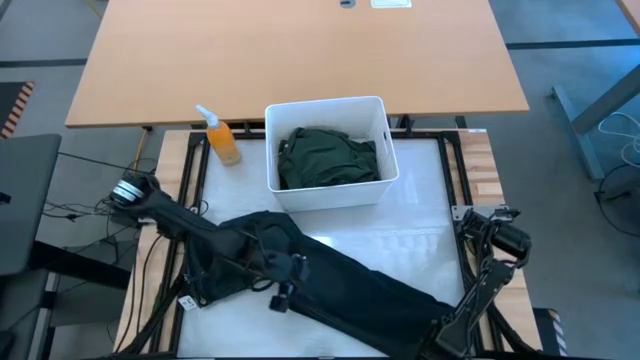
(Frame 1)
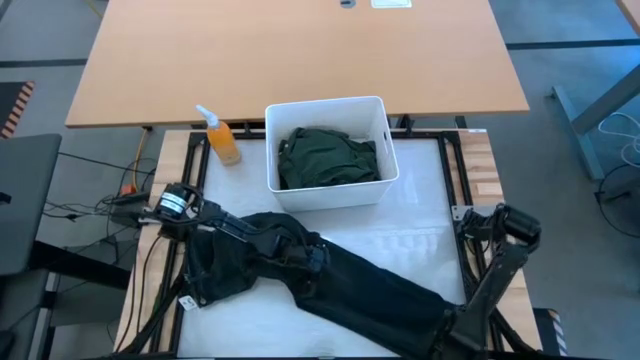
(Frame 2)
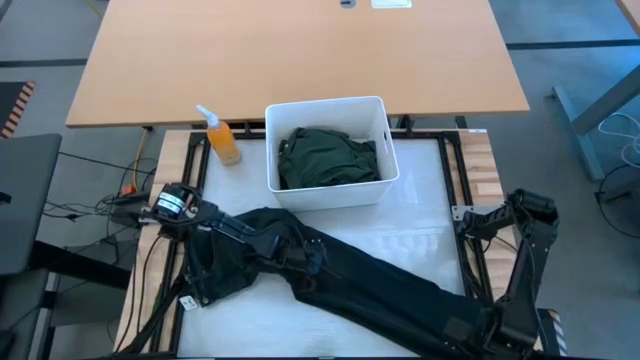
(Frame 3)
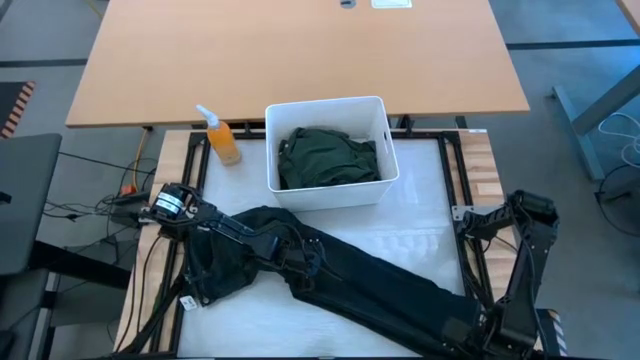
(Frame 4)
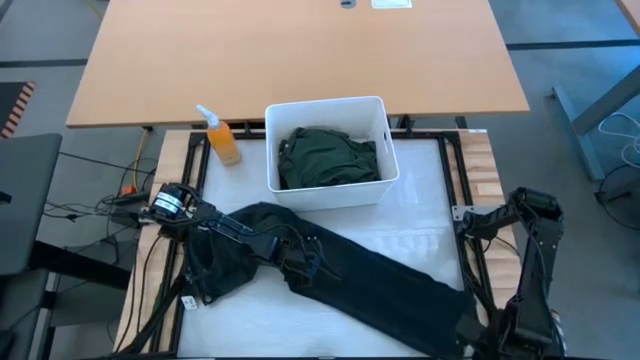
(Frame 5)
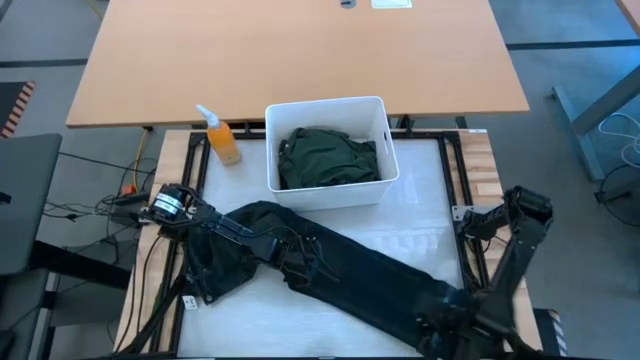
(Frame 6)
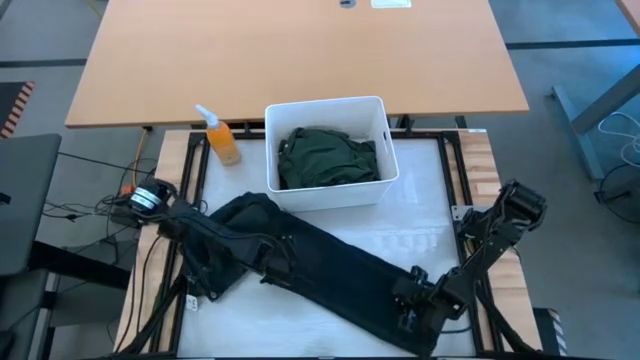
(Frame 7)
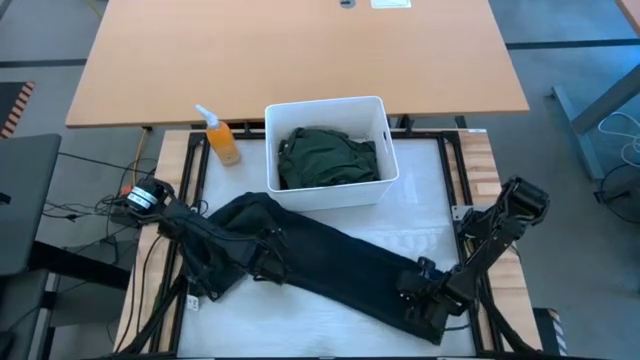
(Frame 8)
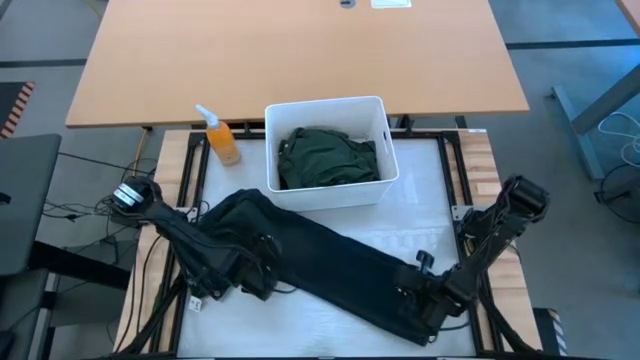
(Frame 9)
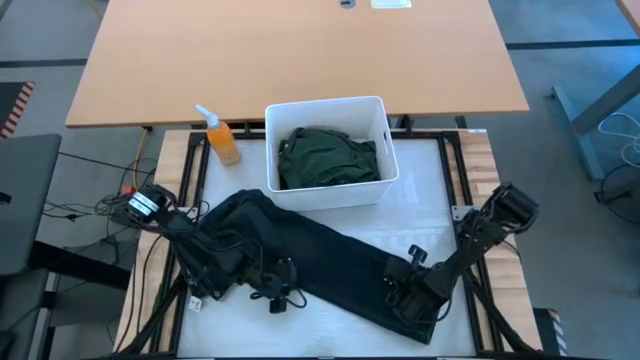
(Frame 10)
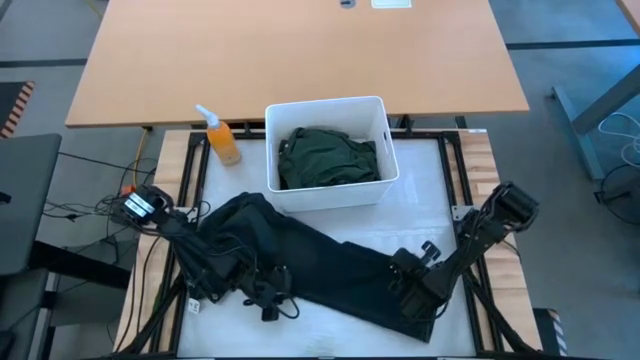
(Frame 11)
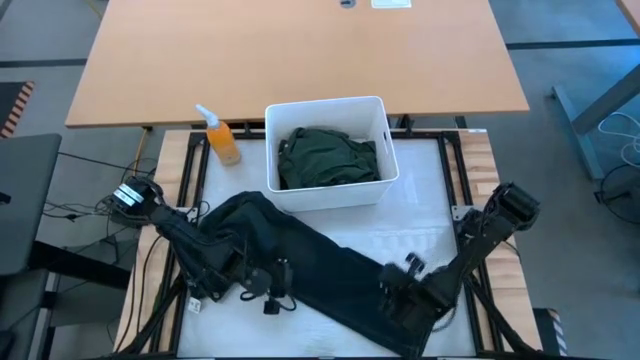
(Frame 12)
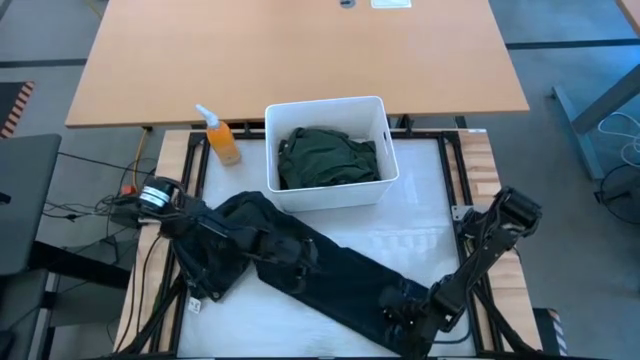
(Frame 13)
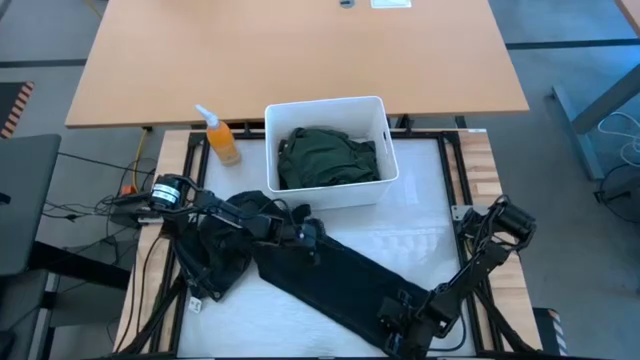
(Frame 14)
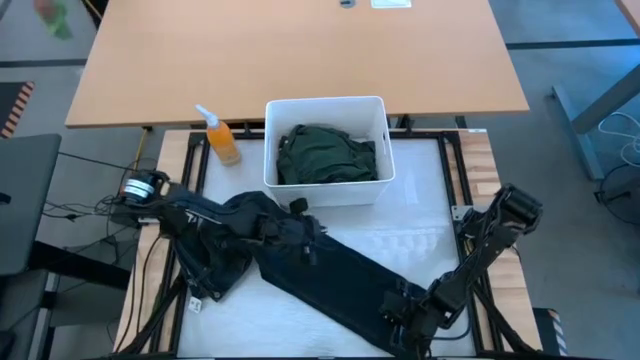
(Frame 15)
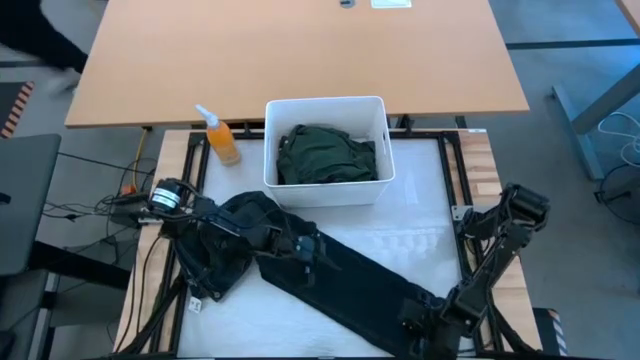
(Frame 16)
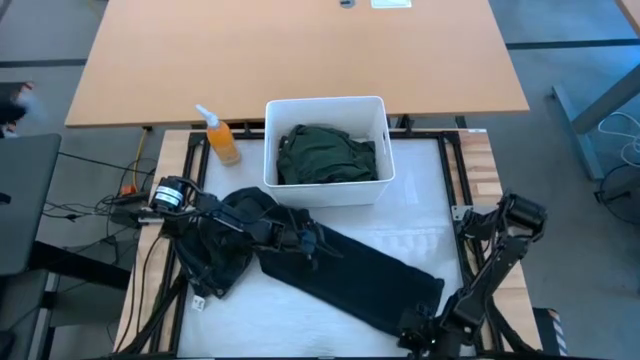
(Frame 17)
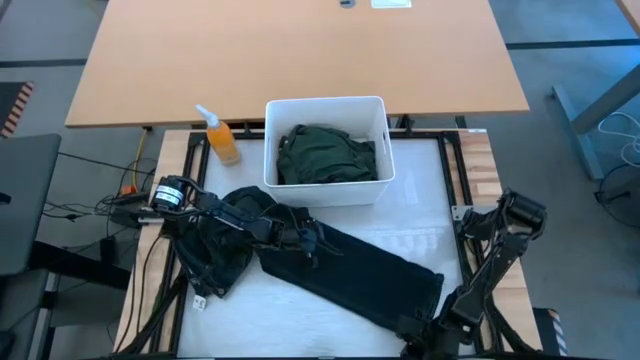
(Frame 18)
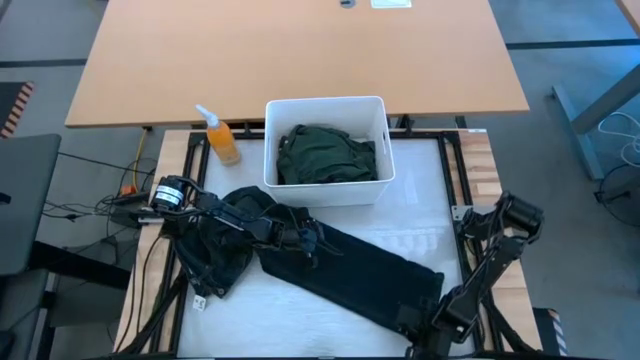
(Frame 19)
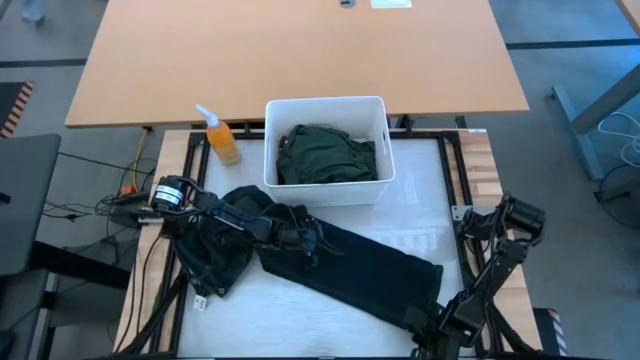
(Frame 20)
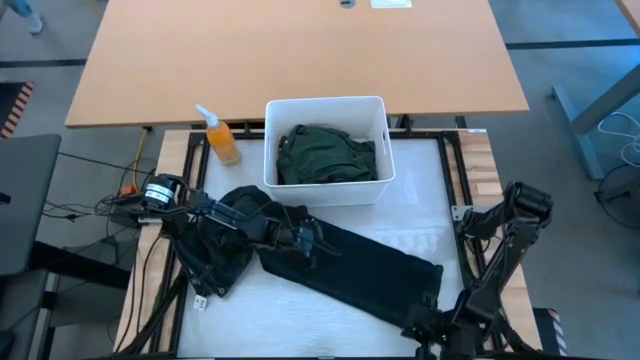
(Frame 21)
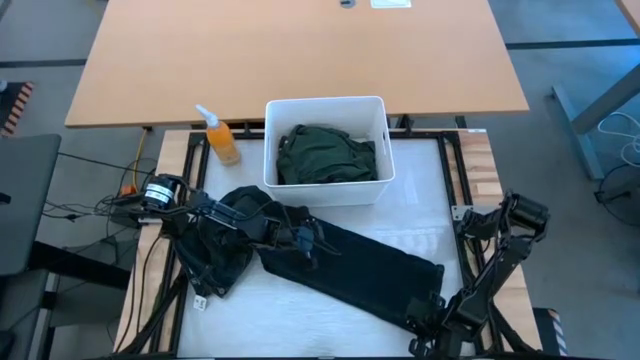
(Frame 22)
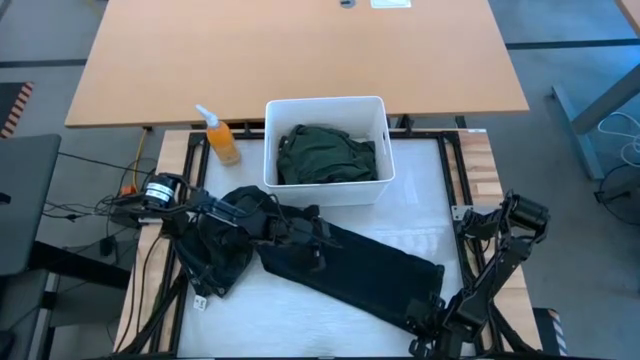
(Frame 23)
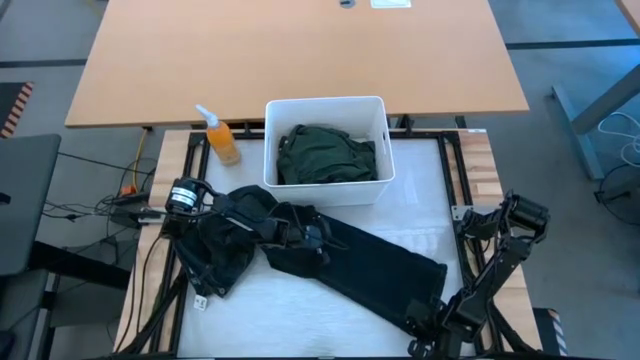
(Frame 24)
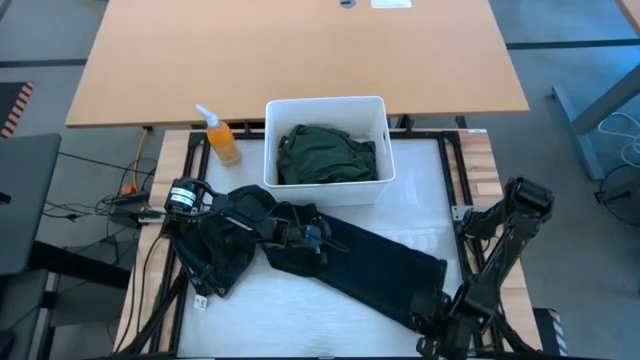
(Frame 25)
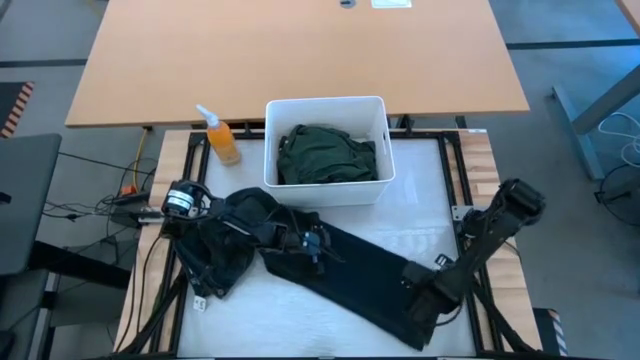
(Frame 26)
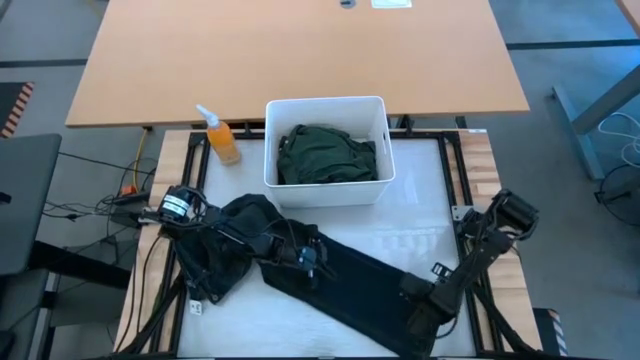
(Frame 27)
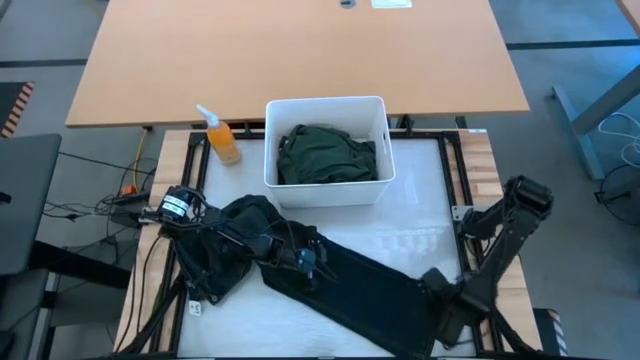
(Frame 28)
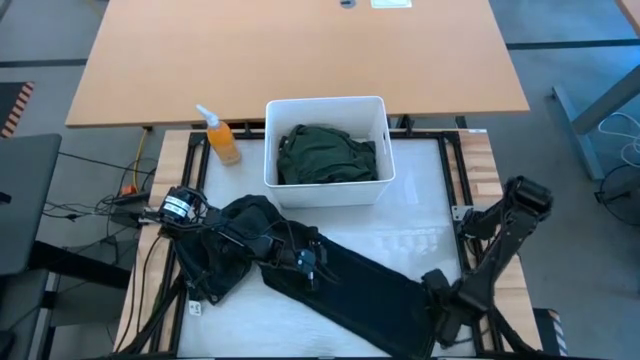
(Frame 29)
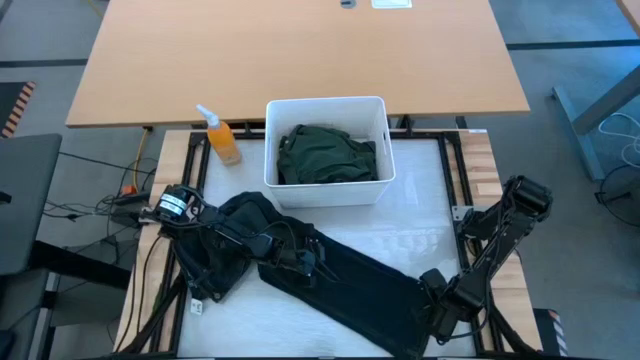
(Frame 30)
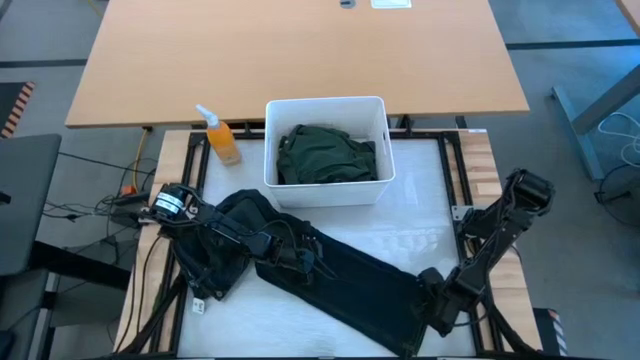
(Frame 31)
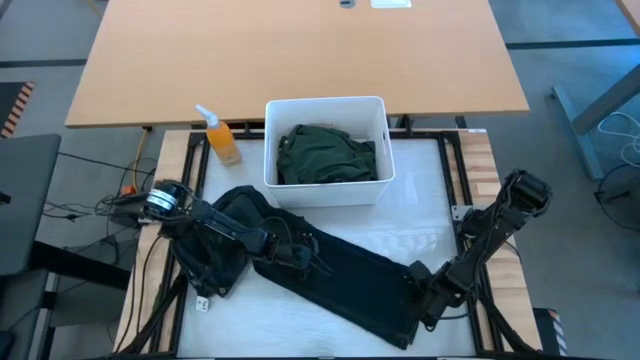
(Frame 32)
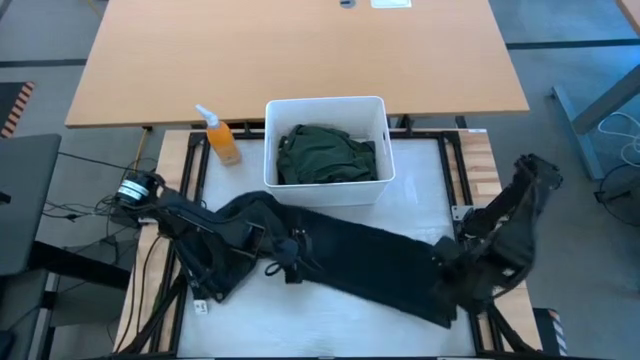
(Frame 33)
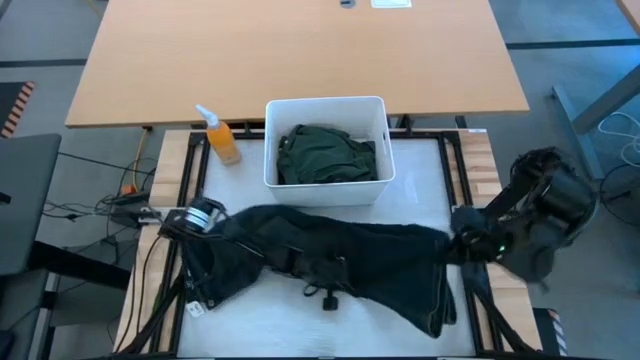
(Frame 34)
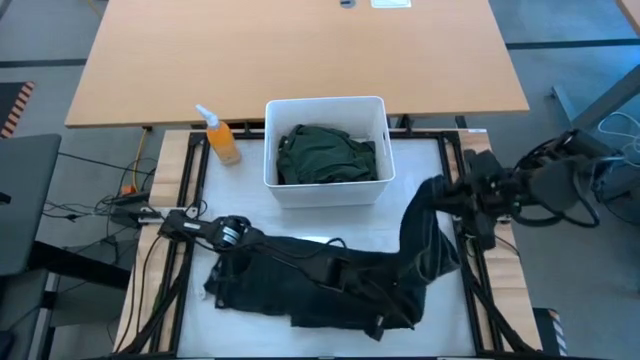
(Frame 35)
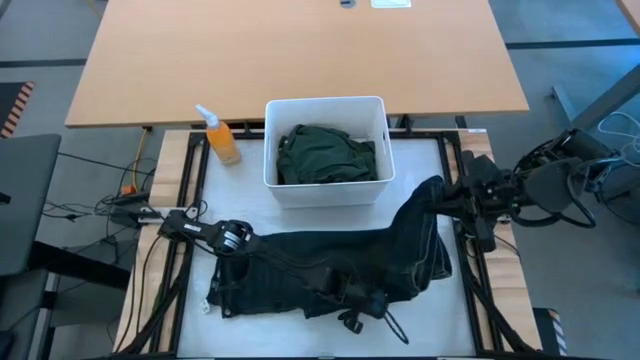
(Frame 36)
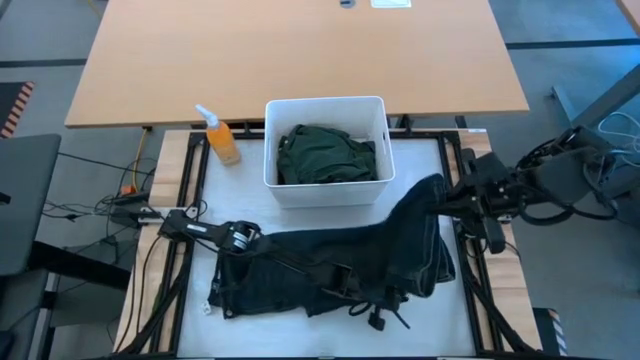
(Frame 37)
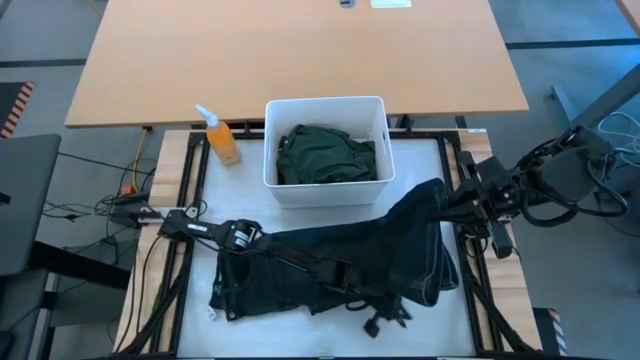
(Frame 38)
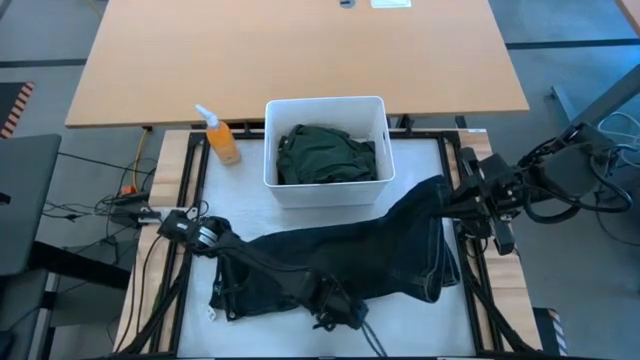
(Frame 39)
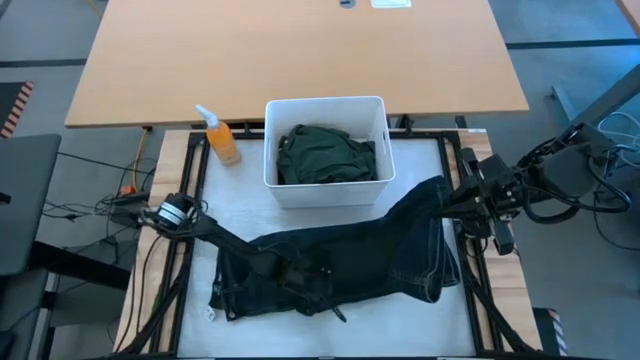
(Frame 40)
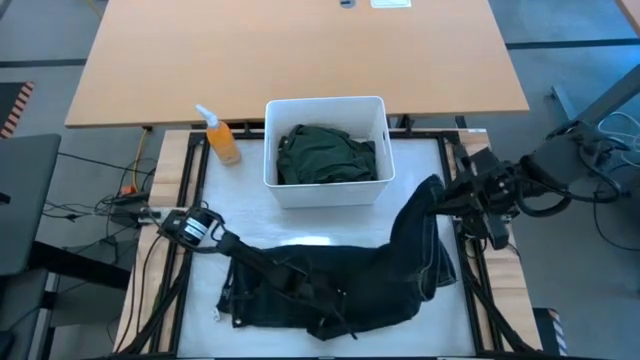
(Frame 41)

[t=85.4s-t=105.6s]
Task: Fold laundry
Fold the dark blue jeans
